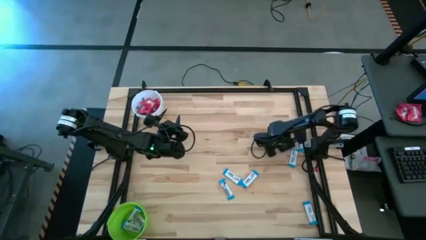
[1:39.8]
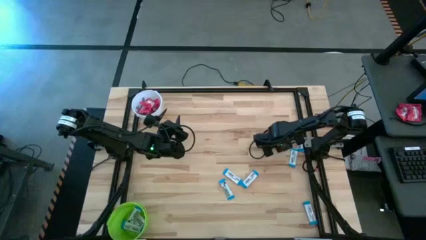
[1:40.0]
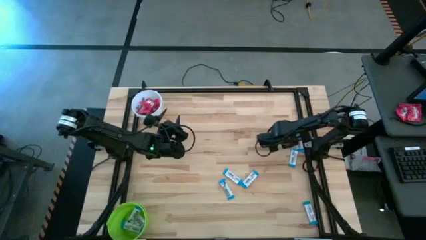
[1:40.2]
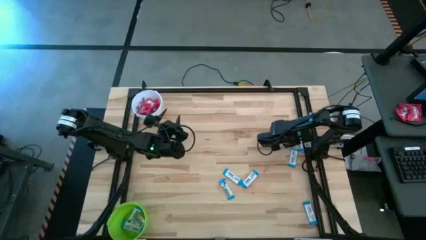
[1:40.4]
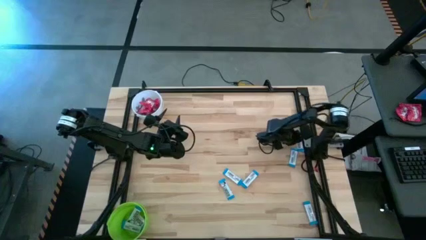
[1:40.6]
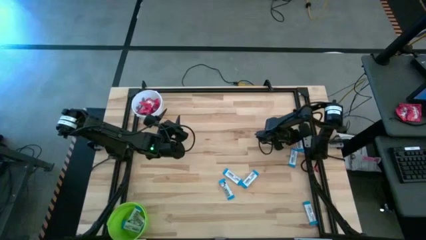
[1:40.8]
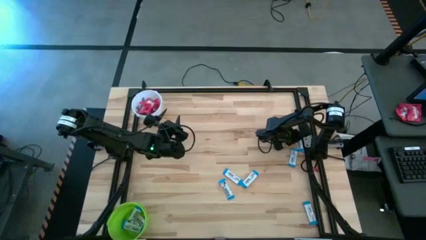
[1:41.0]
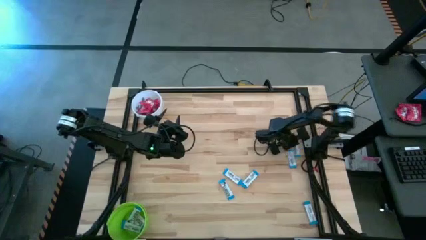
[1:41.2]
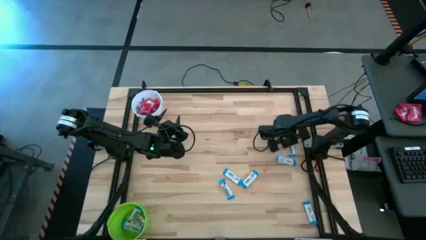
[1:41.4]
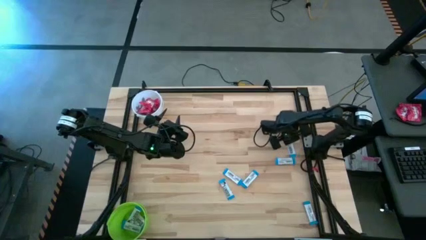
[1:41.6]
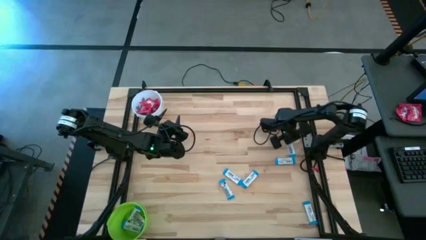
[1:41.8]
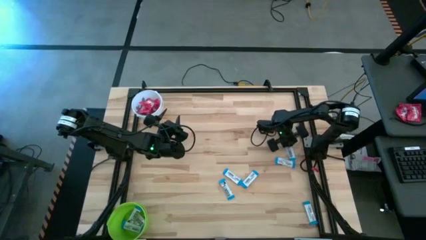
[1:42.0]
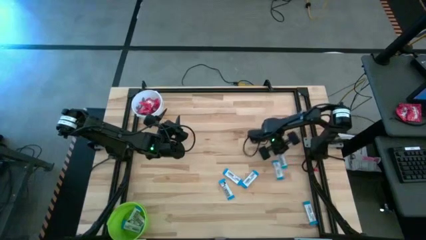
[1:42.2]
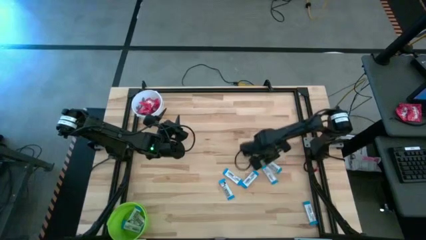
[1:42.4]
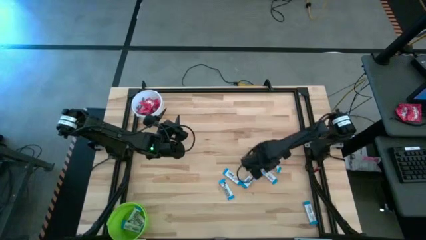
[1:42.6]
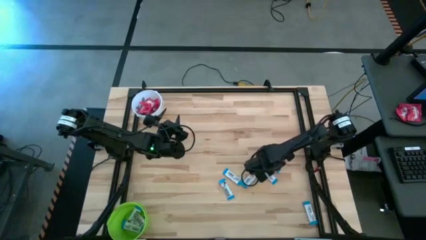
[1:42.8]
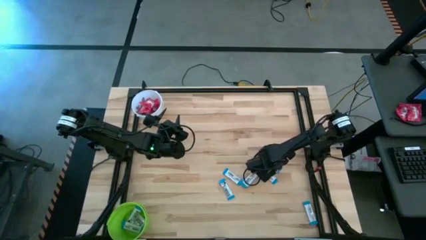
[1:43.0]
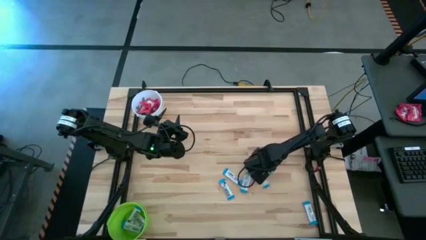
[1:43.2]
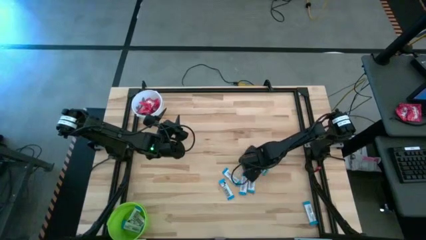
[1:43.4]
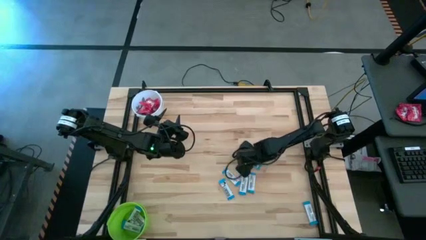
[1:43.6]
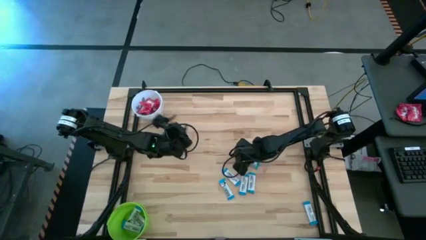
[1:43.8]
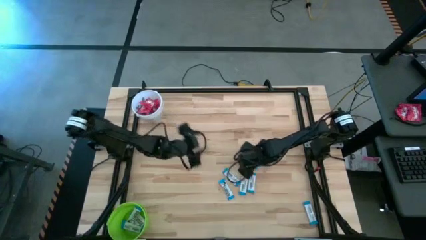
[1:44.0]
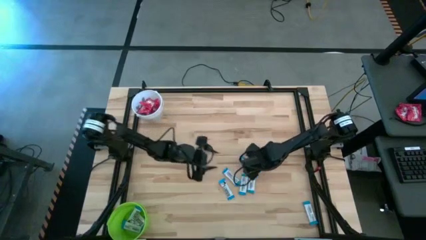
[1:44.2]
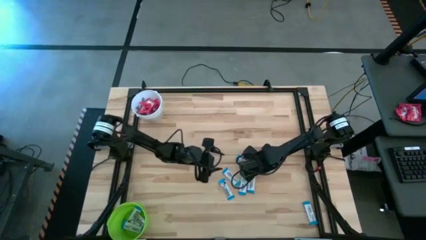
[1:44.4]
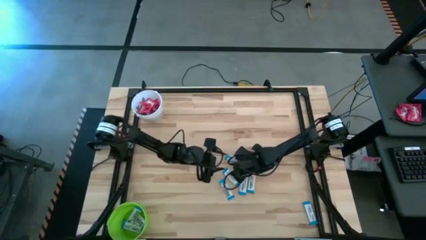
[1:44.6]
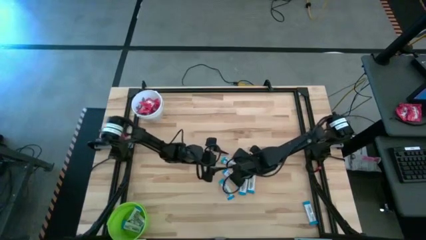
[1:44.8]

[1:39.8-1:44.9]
Task: Sort candy by brand, put in halloween buckets
Move the blue chocolate bar to the center of the table

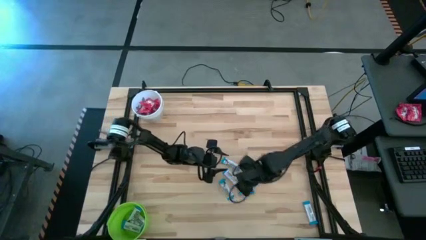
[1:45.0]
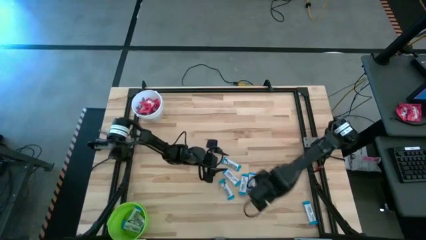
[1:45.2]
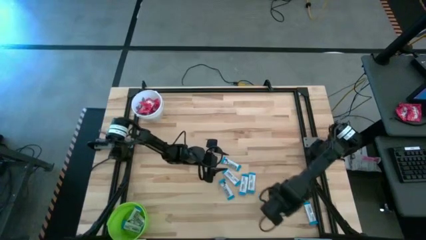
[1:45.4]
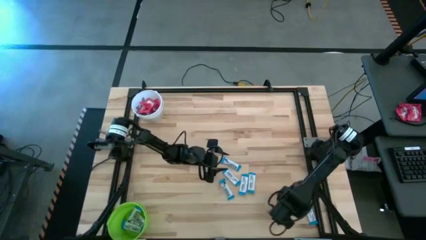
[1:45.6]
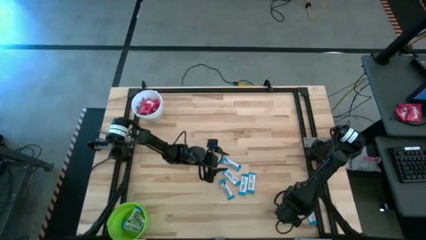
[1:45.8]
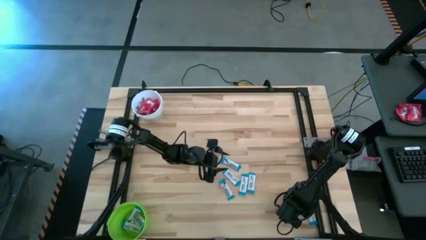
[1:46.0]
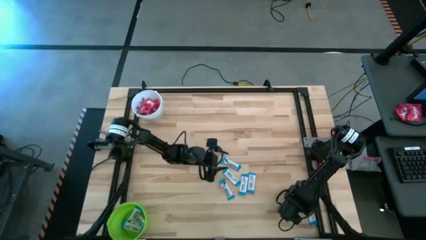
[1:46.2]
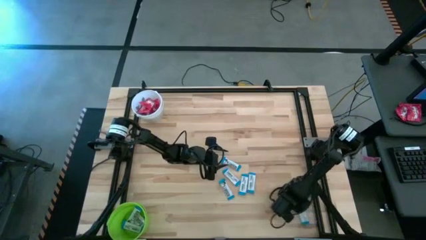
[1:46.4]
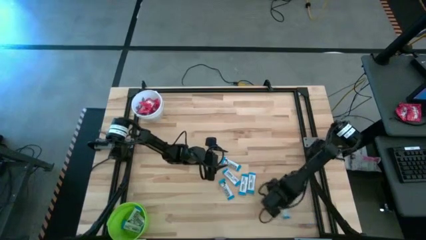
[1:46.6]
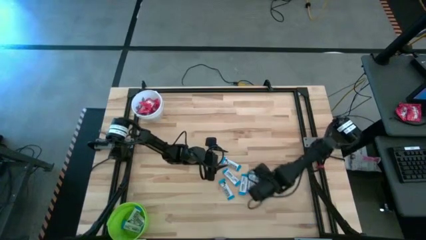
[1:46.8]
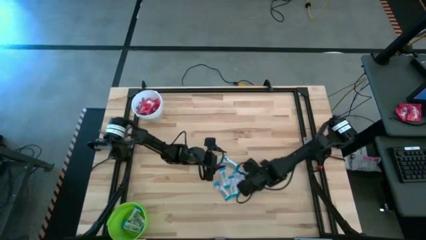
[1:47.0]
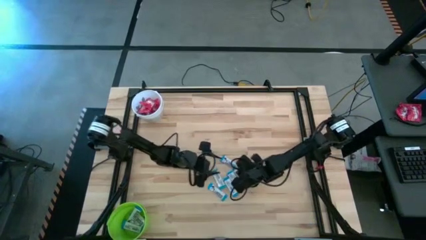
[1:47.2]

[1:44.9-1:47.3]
Move the blue chocolate bar to the center of the table

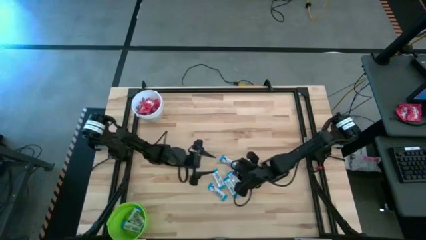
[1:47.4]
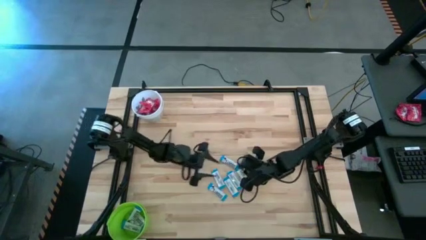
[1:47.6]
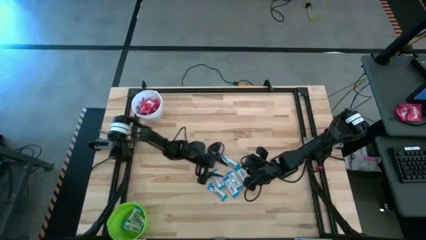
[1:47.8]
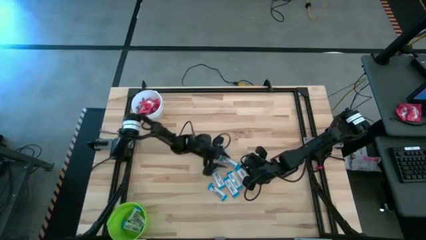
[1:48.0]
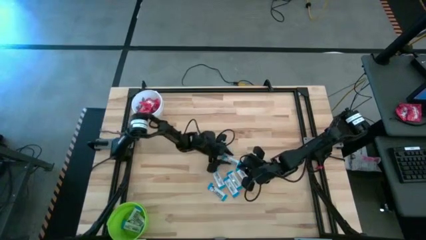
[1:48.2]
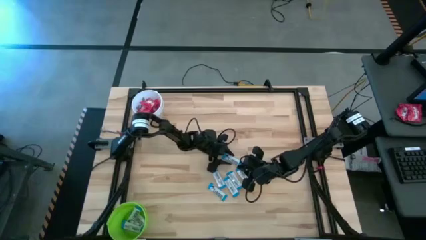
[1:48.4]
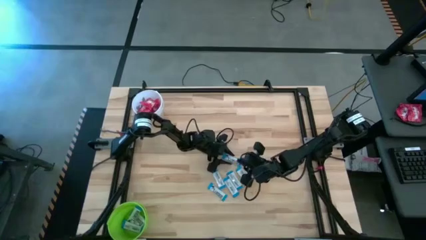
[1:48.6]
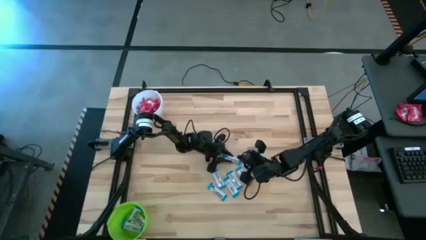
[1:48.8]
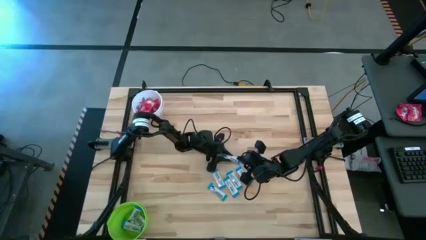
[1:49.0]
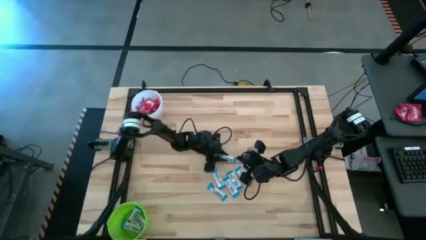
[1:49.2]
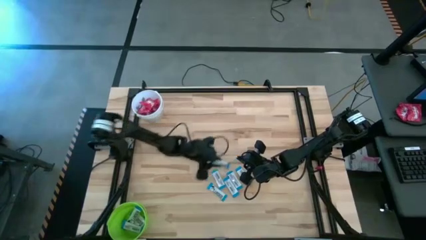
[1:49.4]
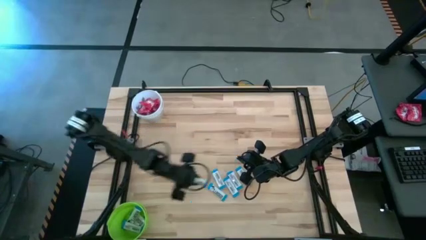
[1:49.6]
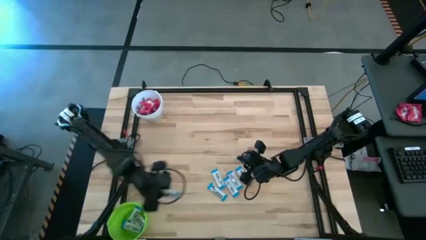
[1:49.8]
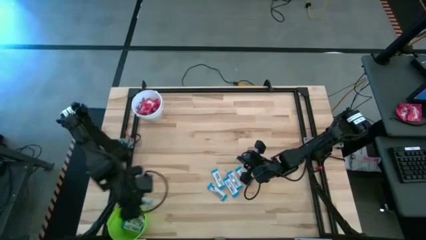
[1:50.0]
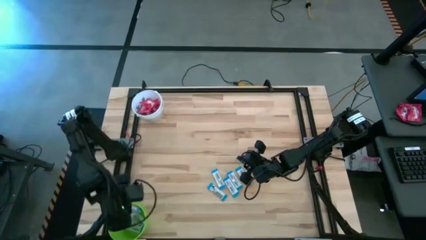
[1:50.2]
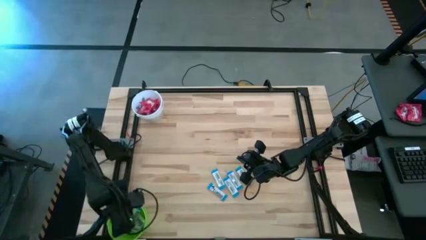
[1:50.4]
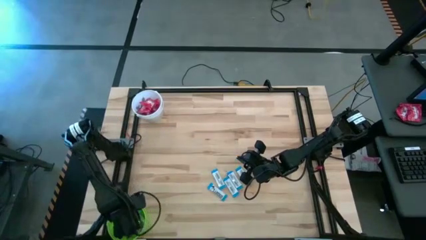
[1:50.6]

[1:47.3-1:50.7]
Put the blue chocolate bar into the green bucket

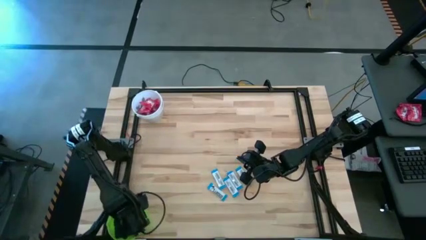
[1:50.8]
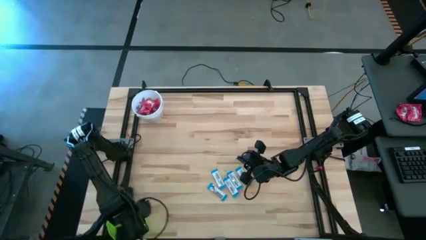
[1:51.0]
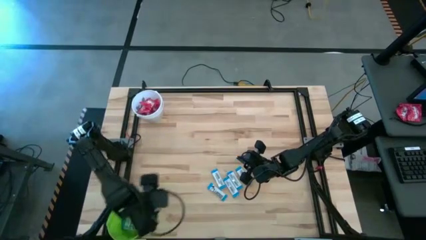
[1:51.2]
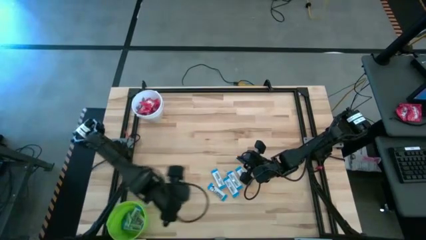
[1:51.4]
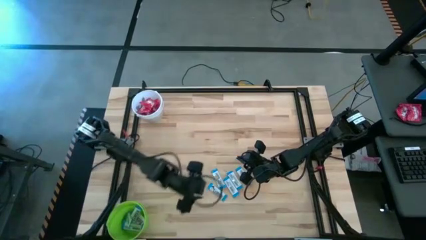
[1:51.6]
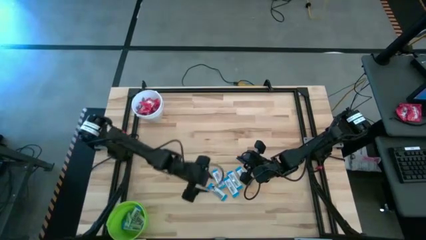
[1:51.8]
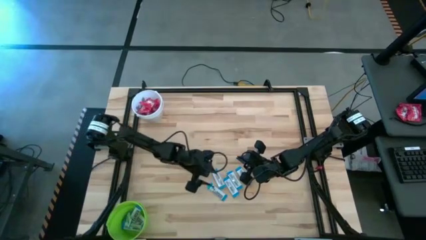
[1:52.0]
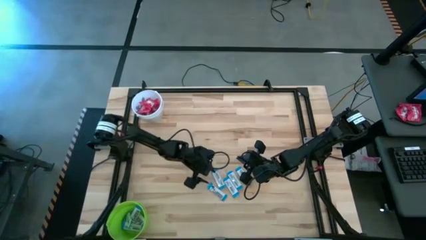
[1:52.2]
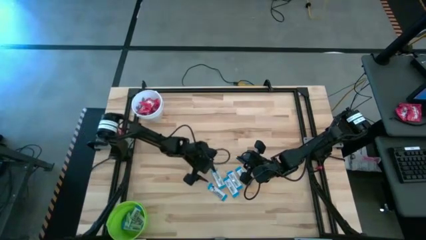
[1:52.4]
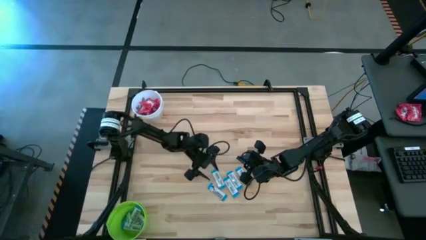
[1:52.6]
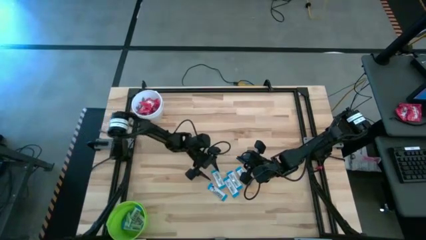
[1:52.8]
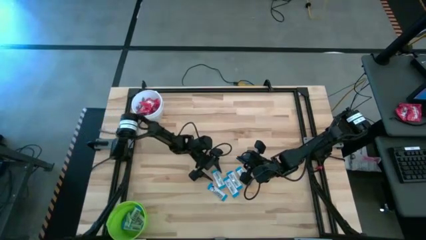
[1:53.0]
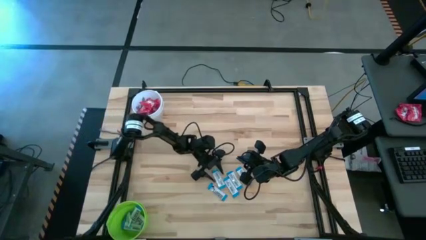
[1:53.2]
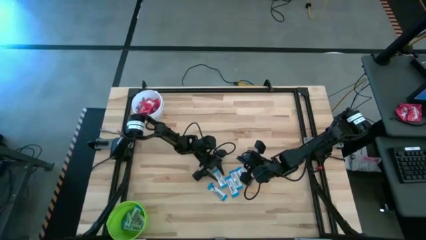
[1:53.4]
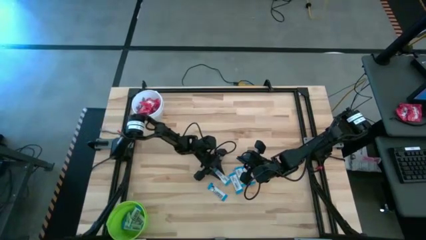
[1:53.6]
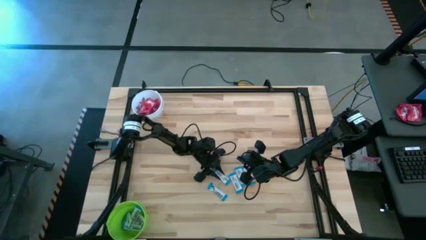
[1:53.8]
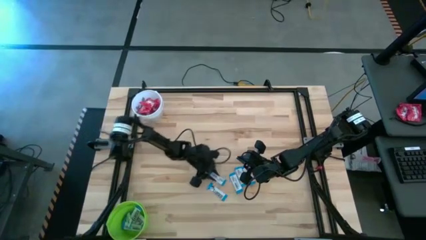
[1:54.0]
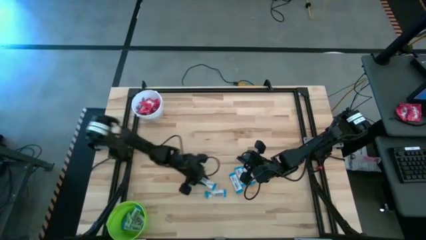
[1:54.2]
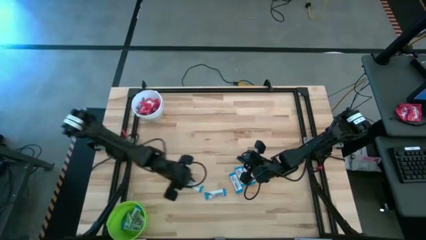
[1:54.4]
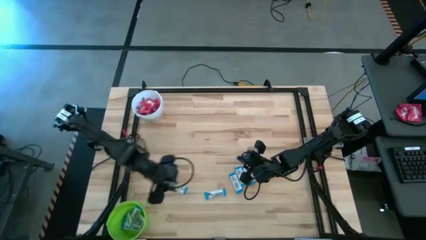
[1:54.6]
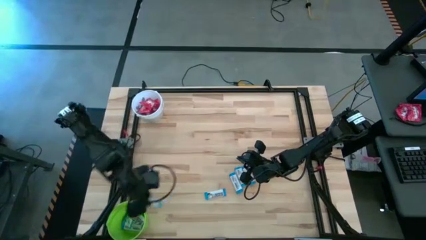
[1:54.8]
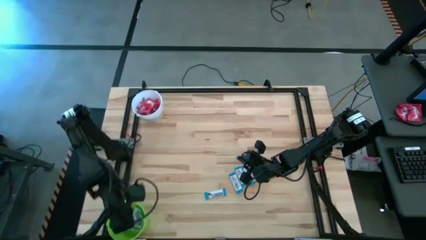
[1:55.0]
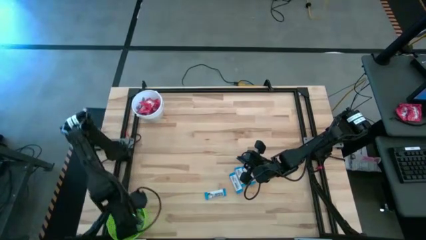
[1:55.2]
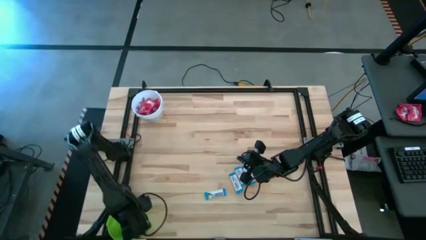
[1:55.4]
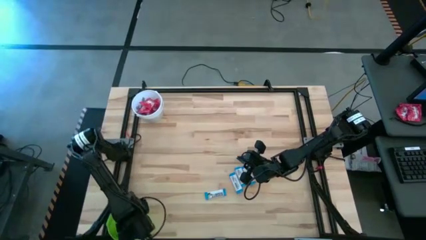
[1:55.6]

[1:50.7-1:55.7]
Put the blue chocolate bar into the green bucket
